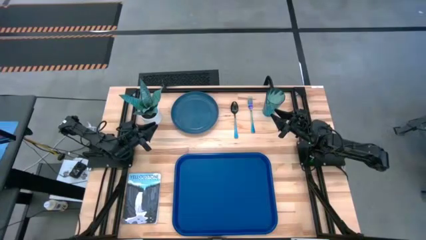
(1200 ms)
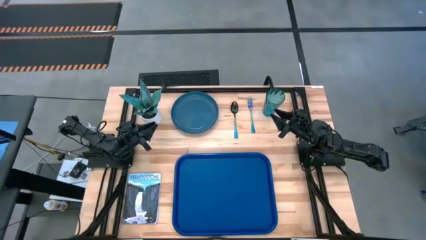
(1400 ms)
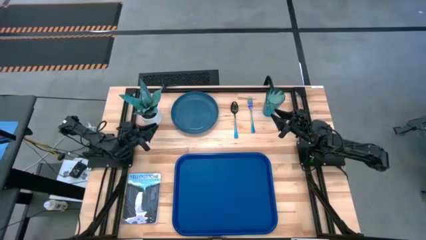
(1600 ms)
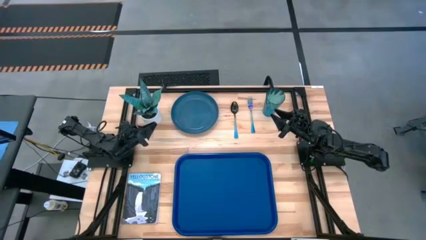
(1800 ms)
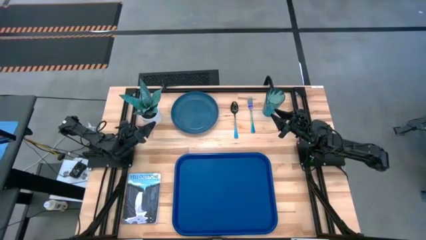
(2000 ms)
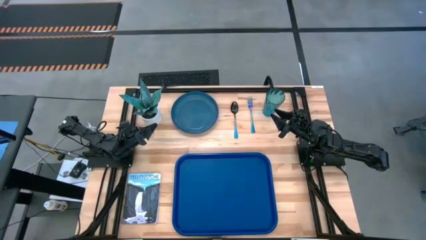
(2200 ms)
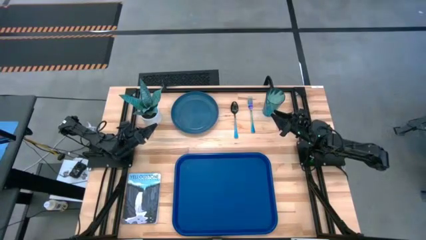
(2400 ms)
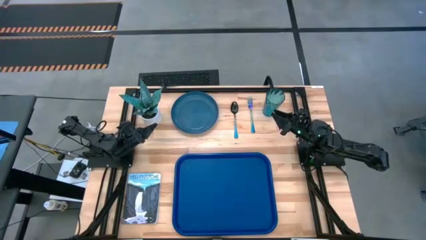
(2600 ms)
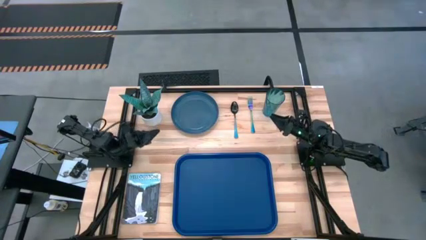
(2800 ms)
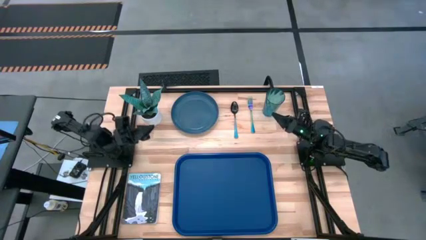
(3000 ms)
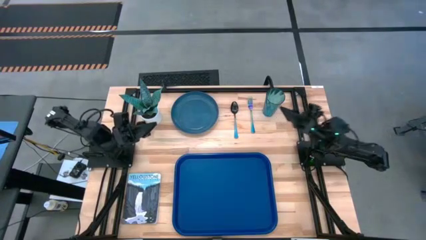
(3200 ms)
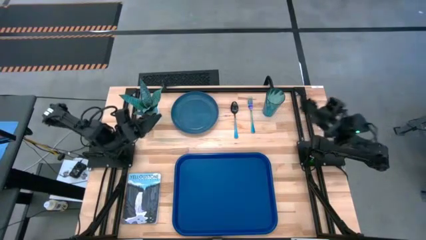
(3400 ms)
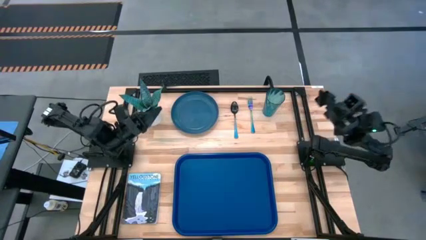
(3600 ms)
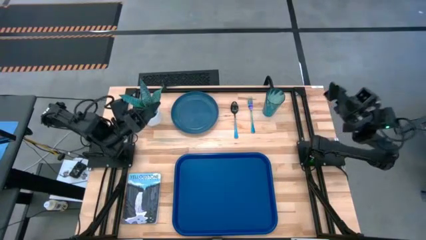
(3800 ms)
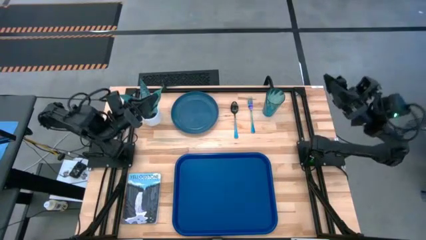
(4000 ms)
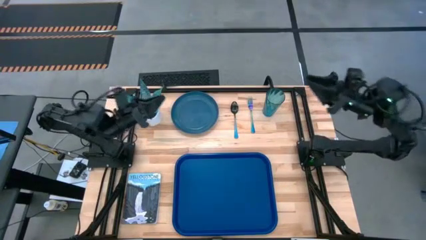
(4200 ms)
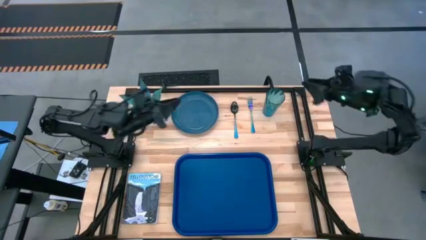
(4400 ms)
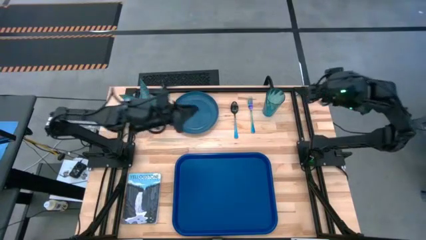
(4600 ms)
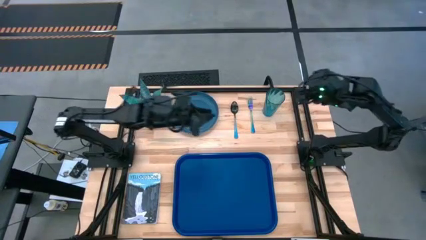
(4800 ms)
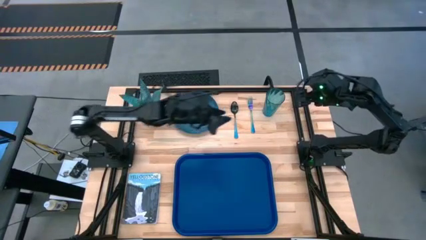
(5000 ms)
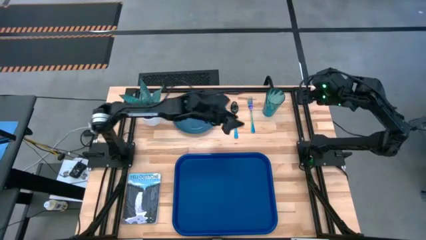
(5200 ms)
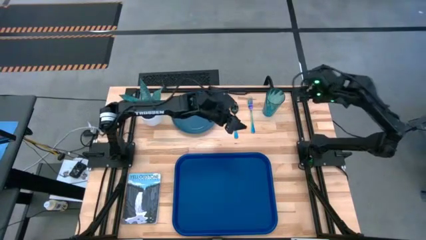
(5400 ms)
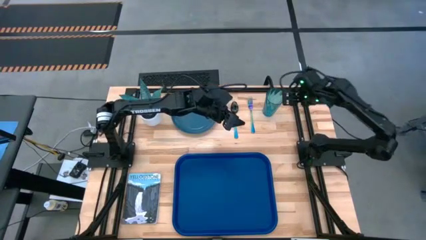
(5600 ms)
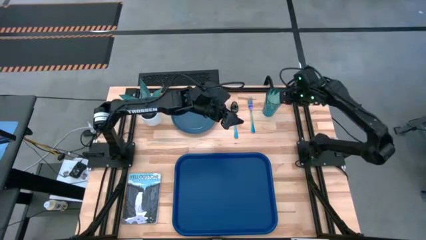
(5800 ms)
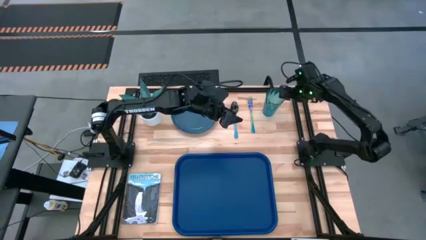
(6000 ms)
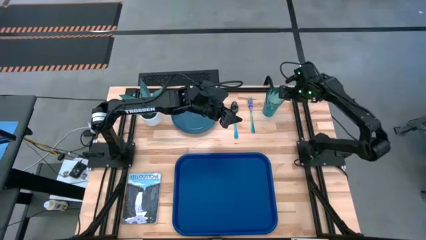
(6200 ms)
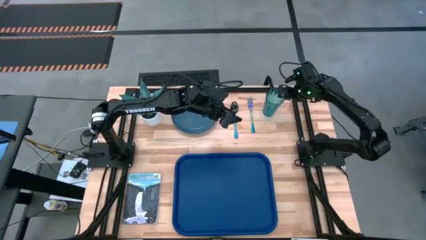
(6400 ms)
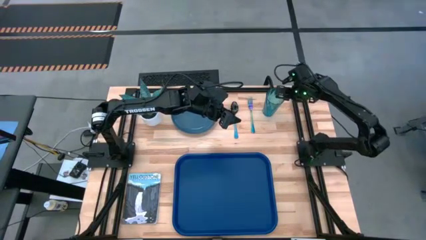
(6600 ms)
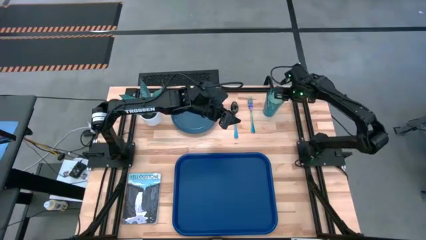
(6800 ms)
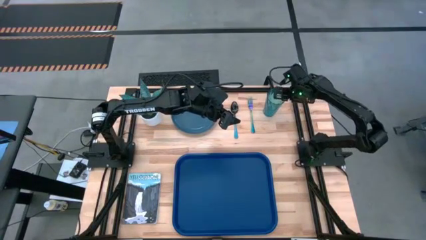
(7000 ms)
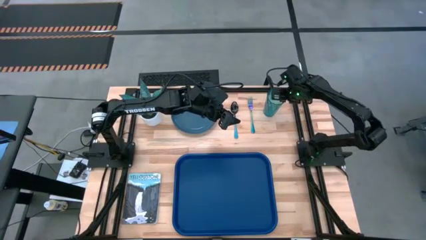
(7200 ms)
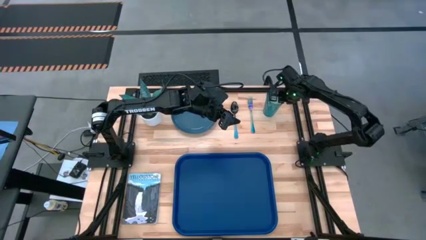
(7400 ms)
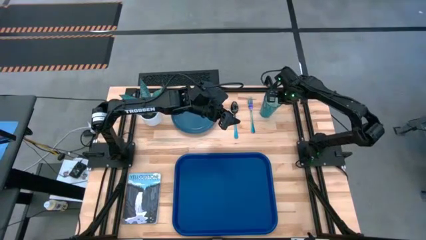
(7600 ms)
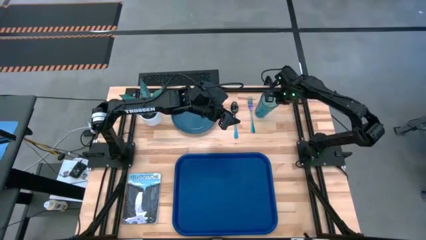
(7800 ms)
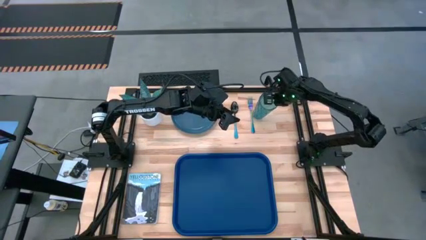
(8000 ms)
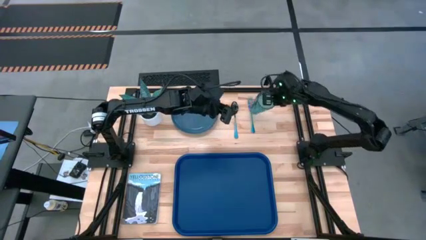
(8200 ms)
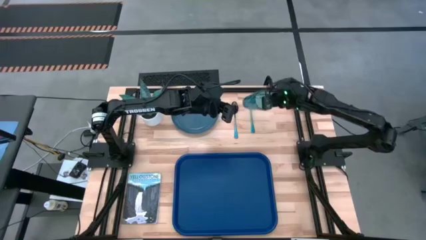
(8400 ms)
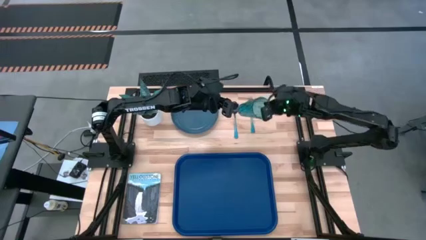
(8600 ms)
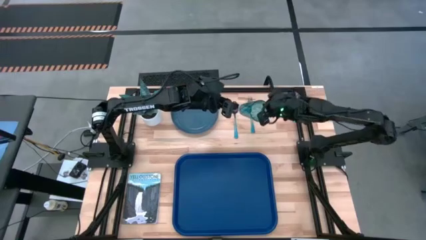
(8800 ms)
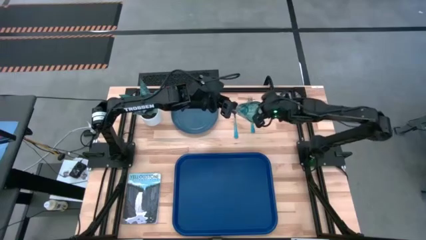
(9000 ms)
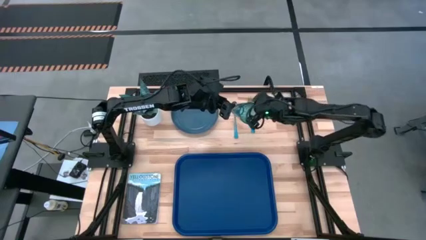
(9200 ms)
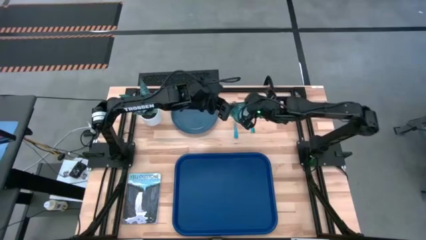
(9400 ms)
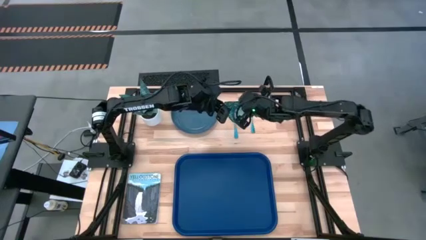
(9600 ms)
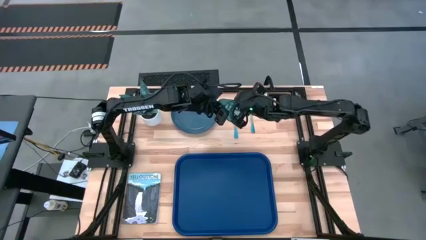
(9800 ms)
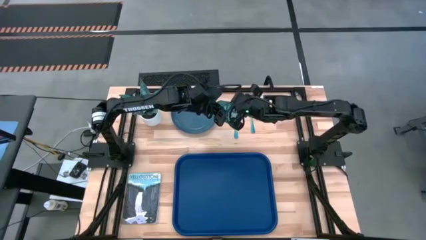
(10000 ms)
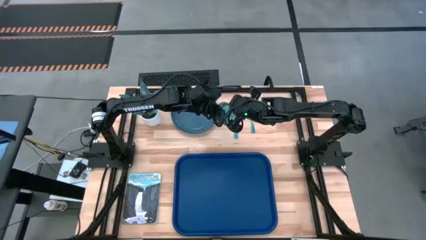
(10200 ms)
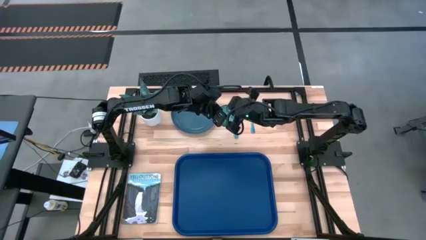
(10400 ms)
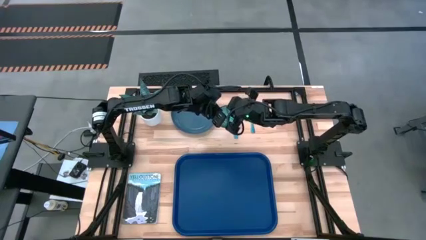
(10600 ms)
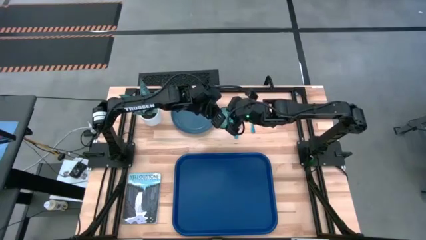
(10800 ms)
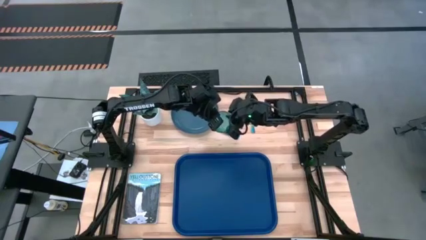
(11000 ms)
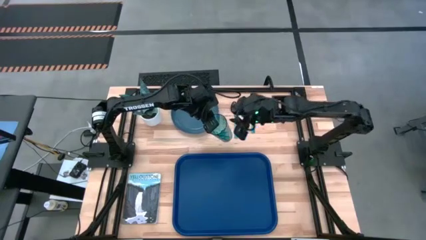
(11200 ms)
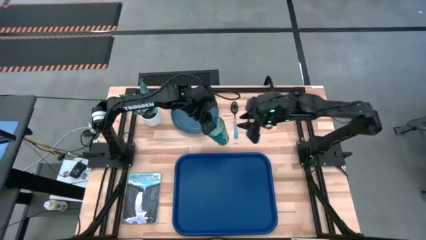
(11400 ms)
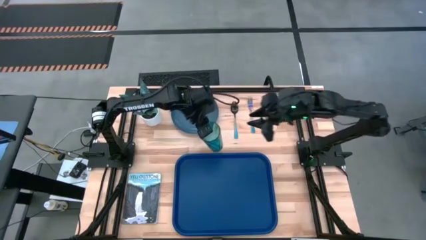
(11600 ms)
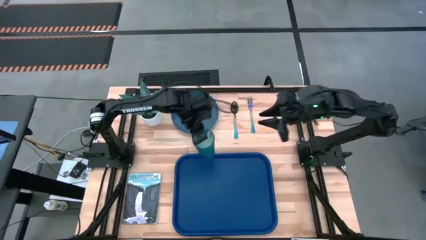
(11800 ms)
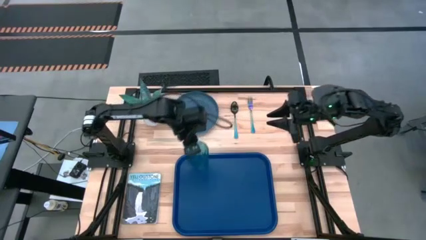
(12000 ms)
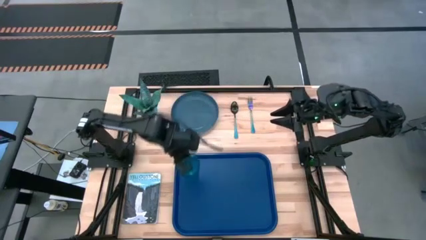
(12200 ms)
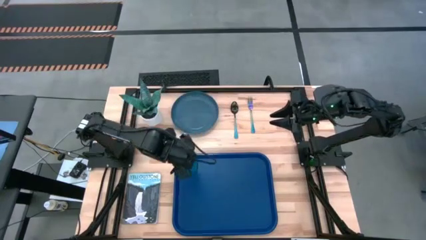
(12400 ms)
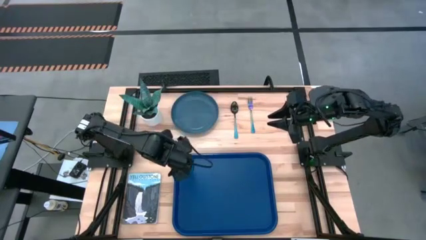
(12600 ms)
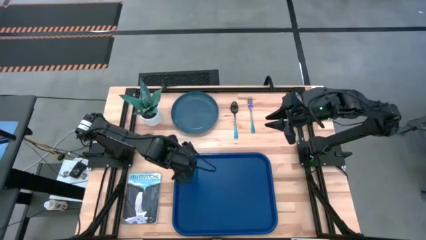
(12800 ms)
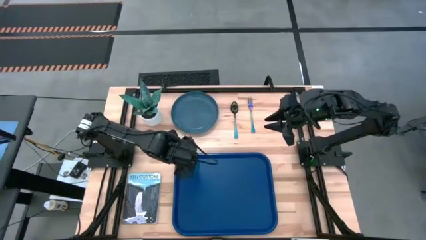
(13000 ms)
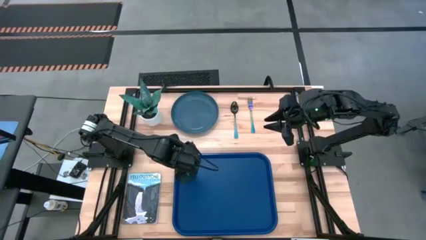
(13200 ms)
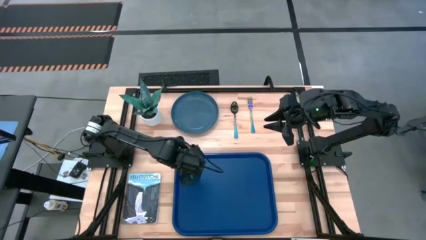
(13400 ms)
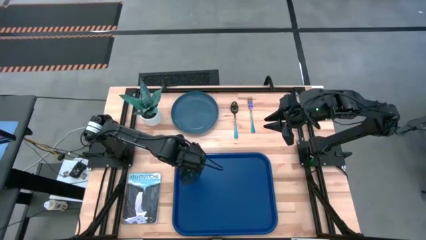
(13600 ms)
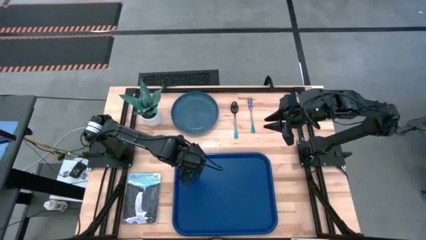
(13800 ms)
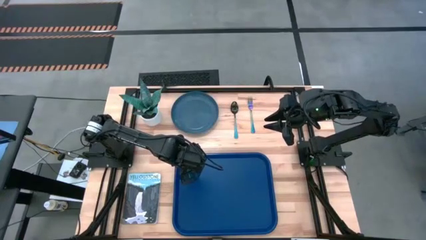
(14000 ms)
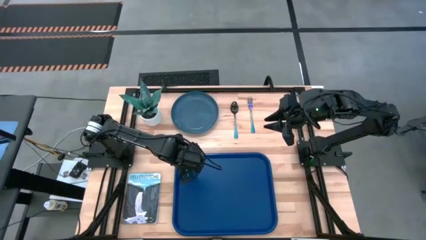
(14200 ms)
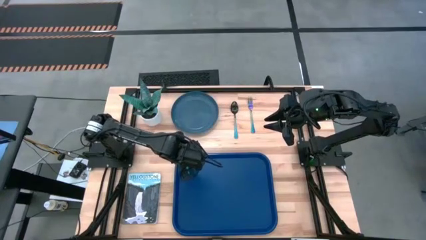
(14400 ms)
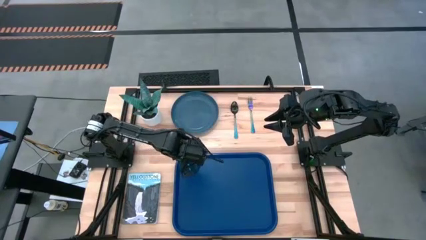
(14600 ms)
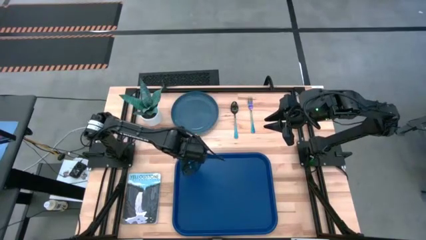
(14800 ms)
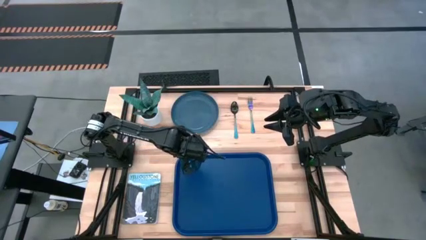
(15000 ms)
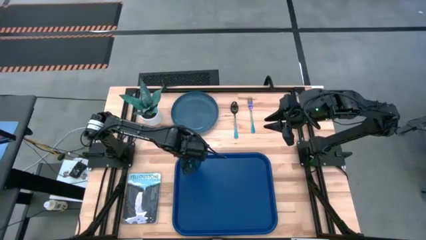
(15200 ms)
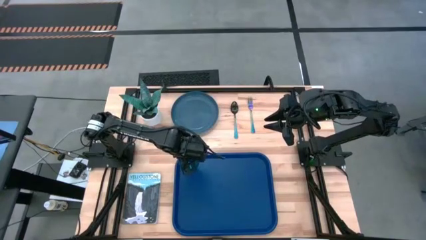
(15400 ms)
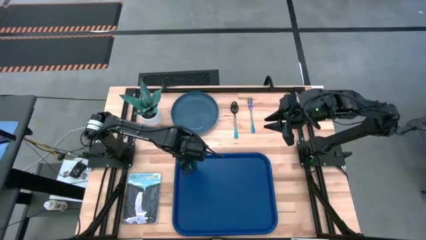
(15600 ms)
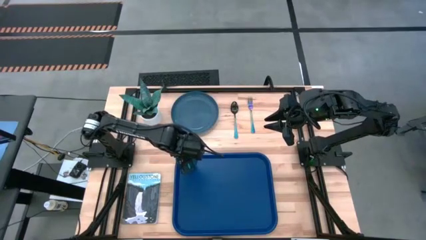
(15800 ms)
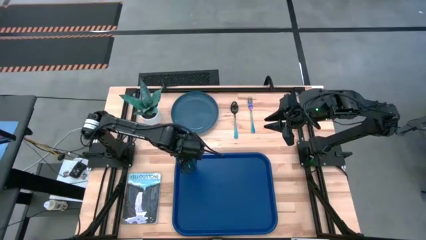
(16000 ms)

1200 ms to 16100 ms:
Task: Pick and place plate/cup/fork/spoon on tray
Put the blue glass on the top left of the blue serving tray

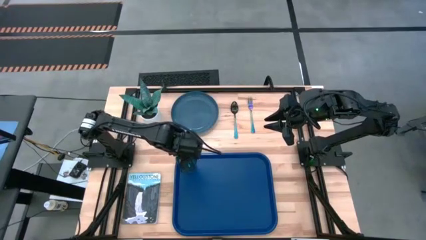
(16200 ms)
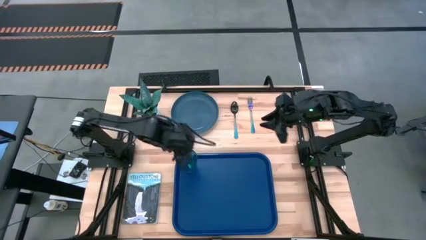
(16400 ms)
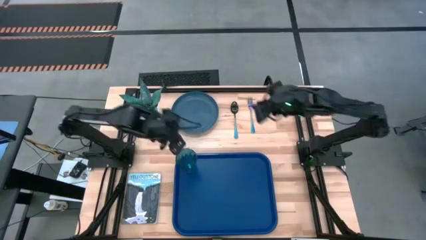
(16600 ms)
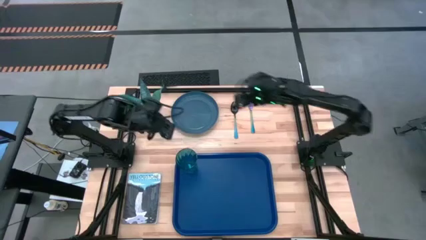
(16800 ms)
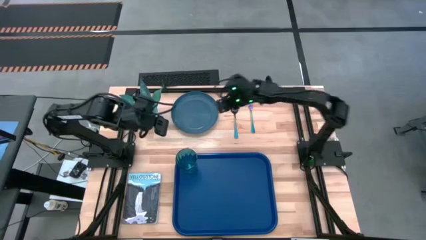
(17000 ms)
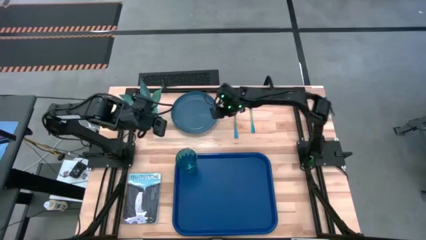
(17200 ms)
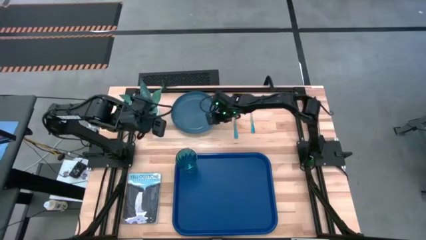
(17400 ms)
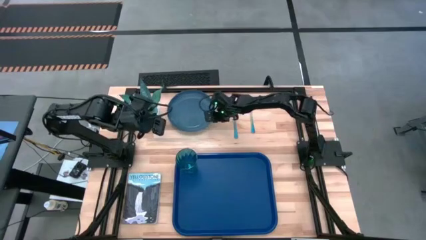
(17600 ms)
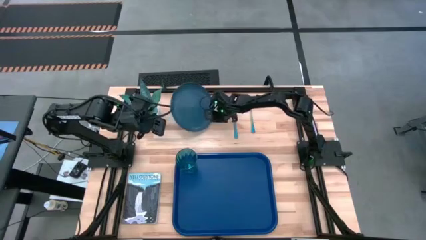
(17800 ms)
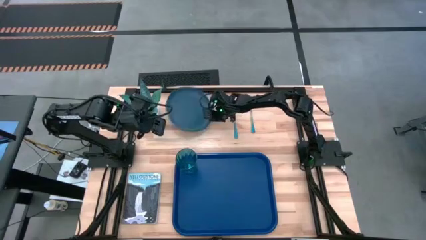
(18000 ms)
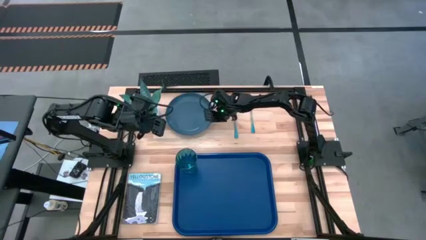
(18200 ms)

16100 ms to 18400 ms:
Put the dark blue plate on the blue serving tray to the bottom right of the blue glass
